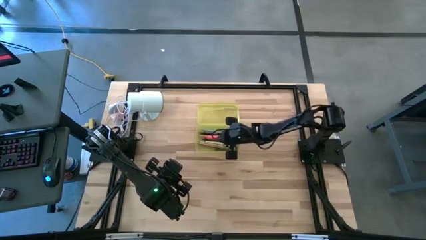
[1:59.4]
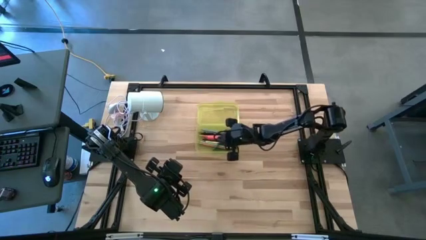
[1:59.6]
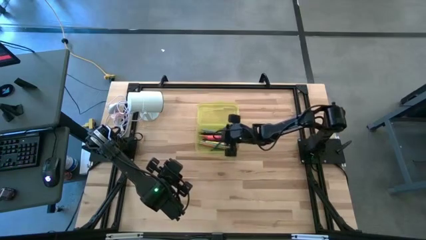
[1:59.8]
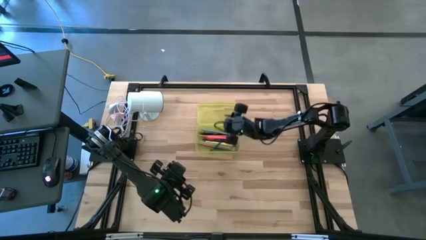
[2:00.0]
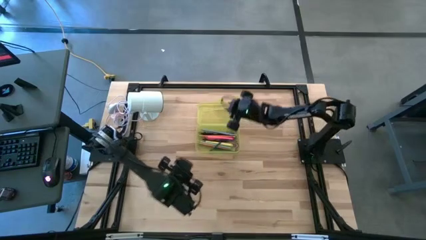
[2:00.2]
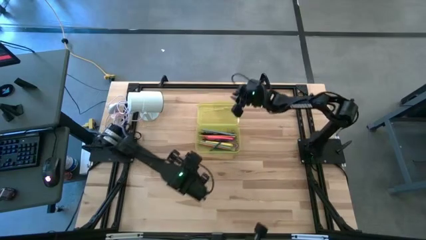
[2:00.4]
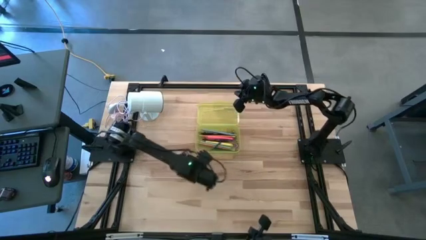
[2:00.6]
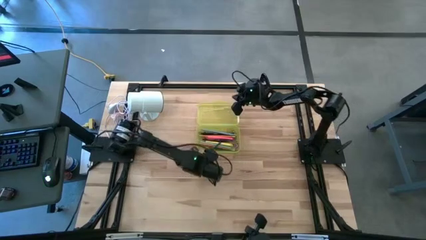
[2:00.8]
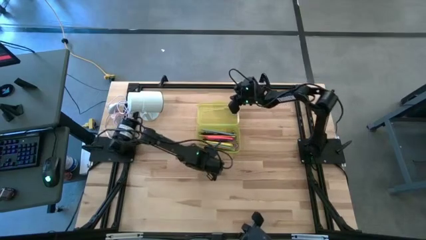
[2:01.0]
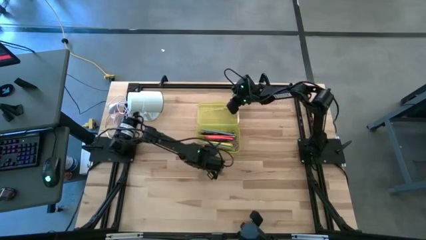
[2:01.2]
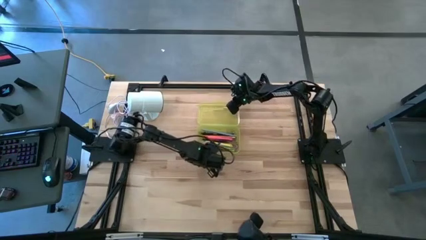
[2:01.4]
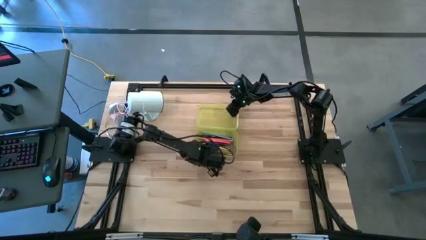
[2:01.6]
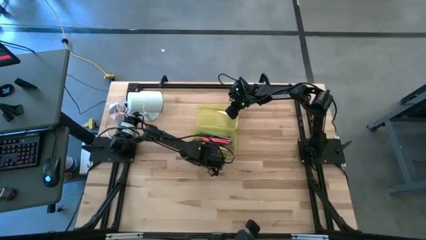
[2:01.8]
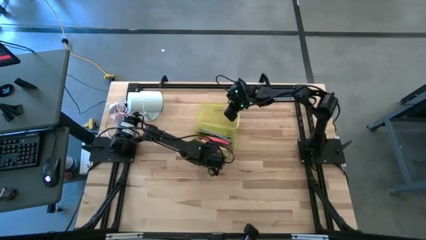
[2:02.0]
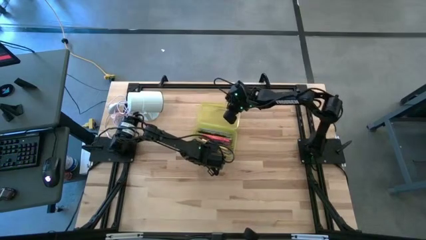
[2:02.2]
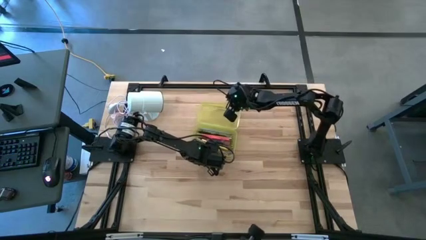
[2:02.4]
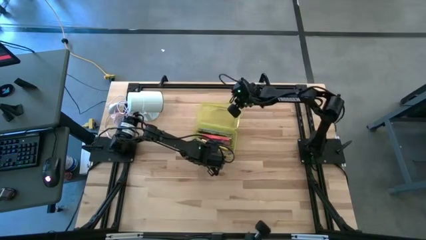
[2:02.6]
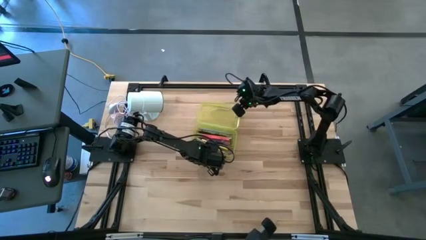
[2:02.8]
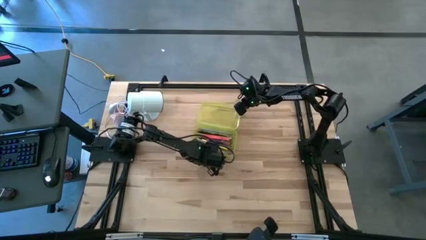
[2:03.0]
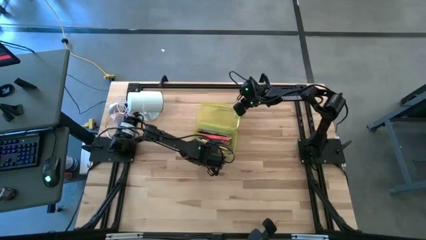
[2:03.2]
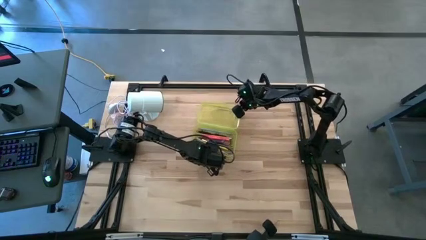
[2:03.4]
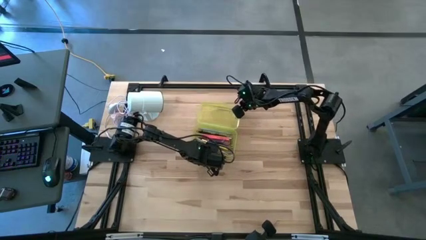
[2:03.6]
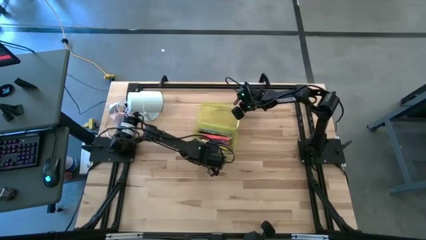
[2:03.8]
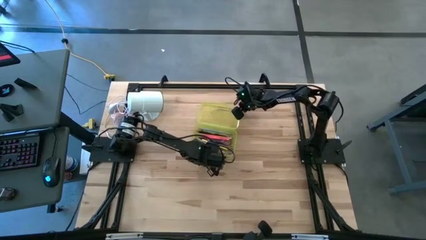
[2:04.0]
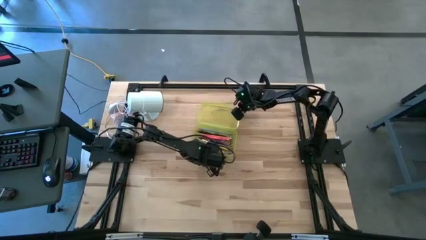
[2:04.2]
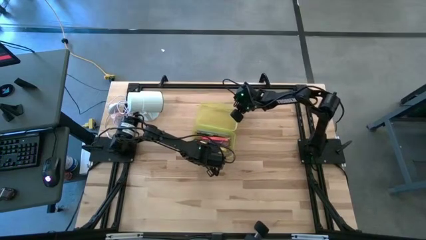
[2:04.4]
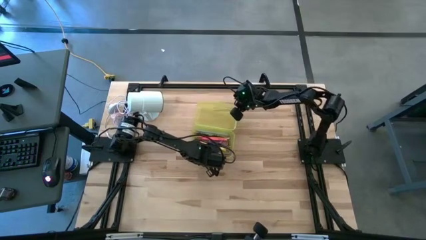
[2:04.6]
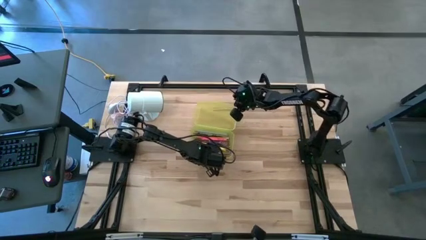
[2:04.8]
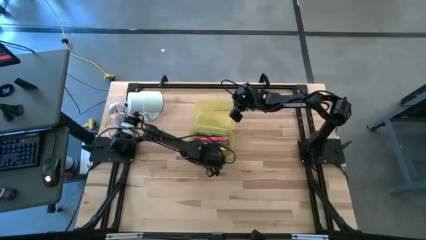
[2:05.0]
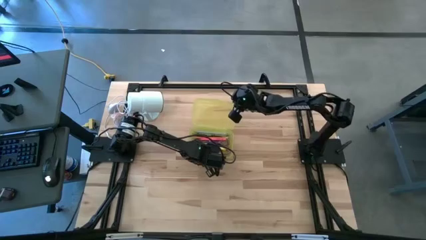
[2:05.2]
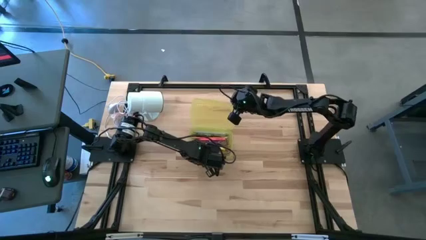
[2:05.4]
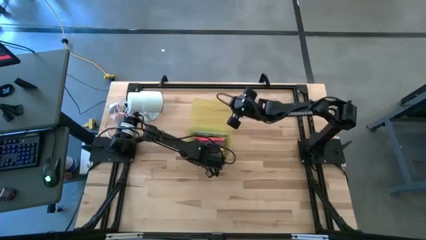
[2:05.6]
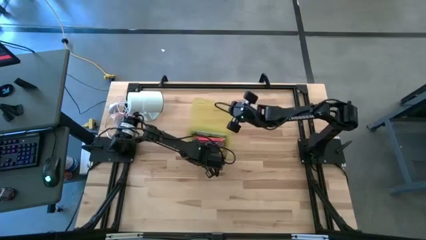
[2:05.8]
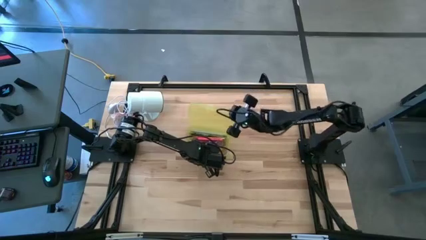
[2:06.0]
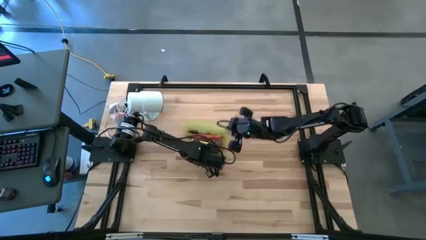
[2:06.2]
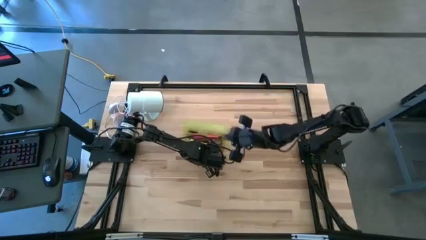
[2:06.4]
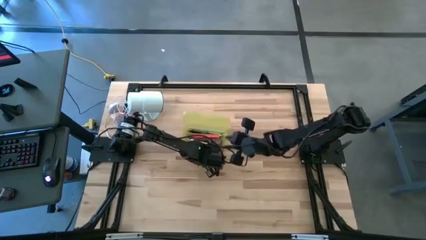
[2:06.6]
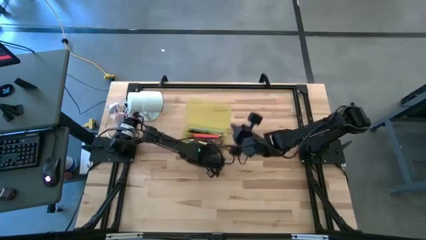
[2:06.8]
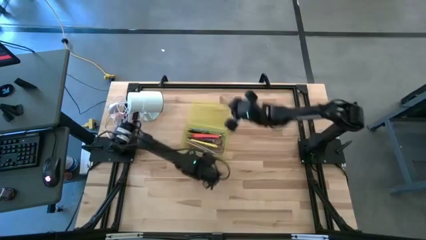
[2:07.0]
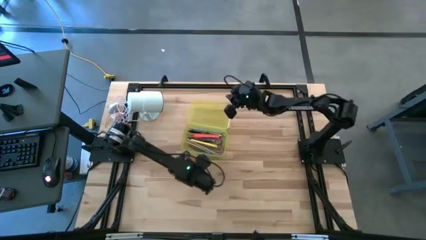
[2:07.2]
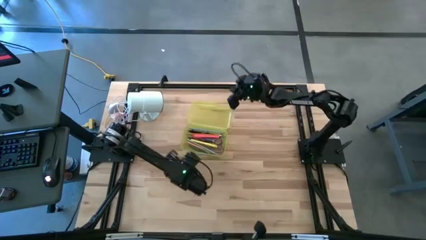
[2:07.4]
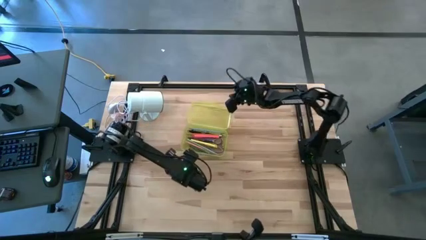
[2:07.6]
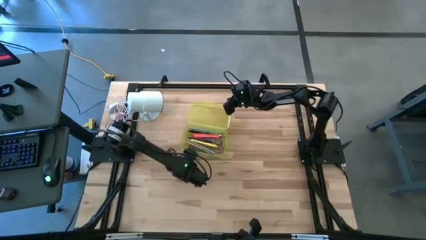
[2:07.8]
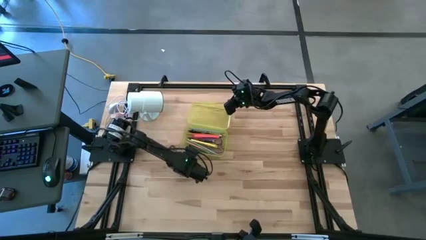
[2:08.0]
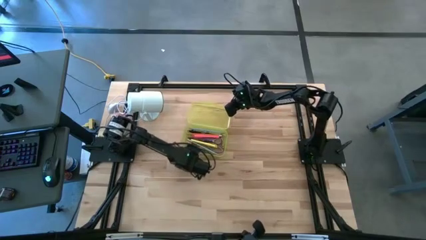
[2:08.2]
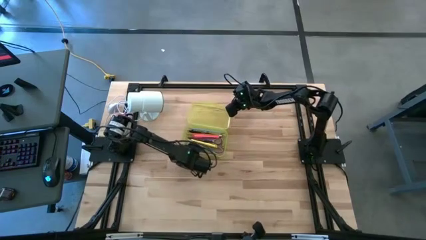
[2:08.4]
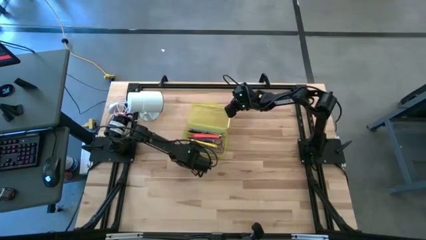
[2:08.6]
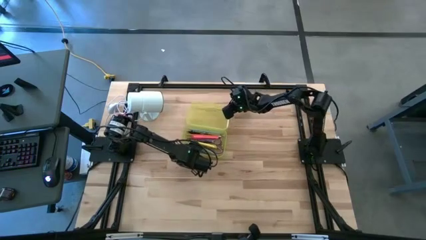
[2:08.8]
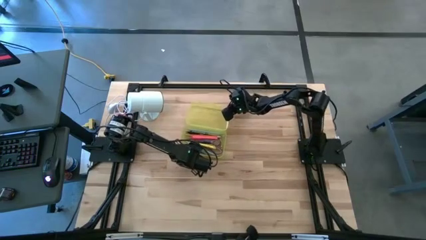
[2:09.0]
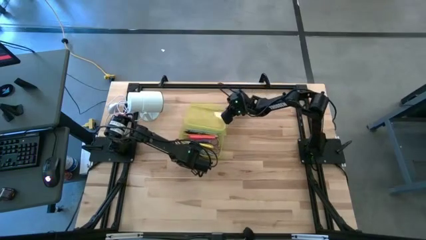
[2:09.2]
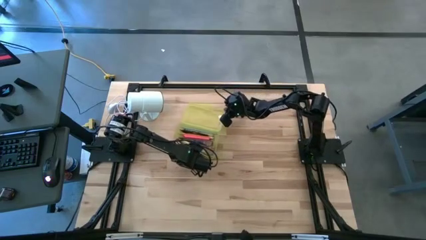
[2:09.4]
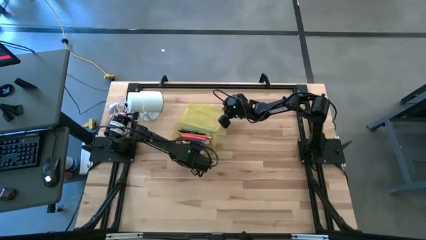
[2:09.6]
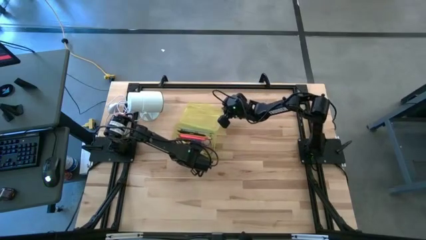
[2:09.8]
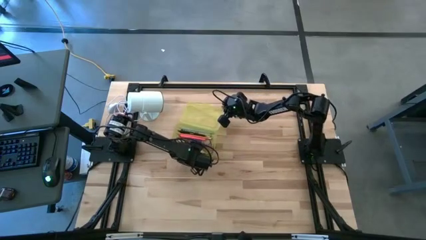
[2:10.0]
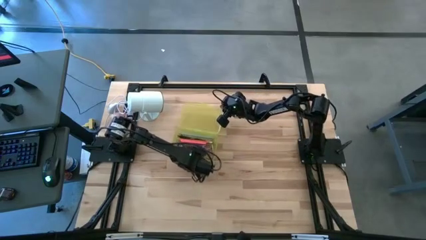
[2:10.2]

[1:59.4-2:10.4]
Task: Pick & place school supplies into a supply box
Close the supply box lid
